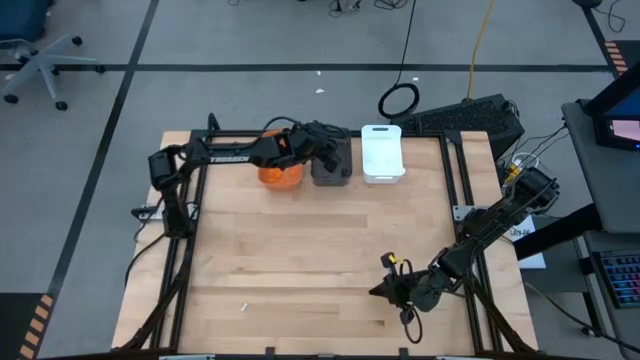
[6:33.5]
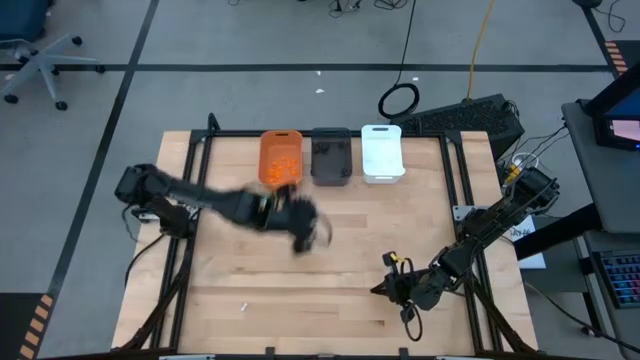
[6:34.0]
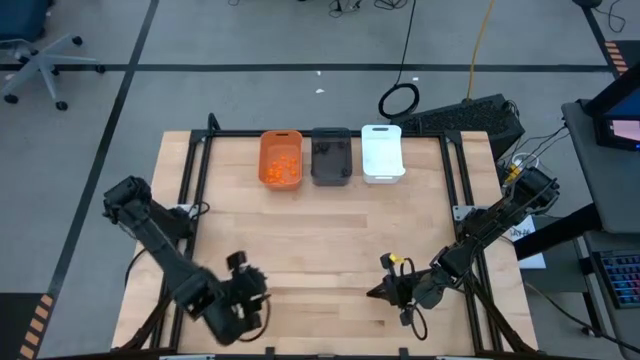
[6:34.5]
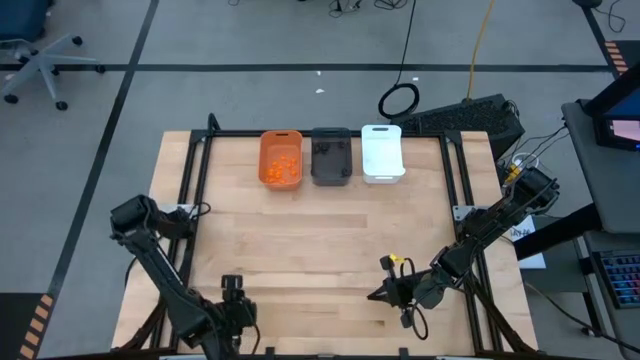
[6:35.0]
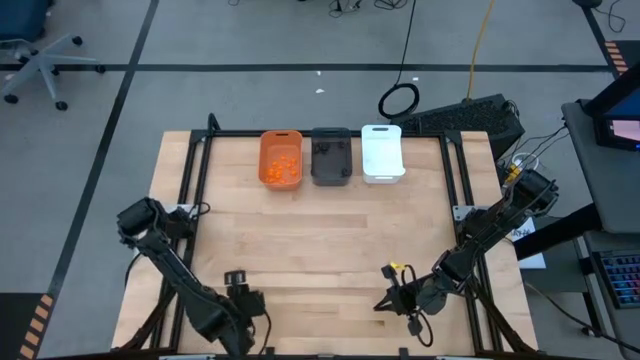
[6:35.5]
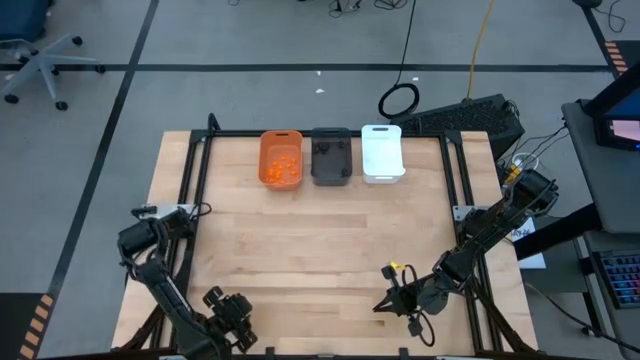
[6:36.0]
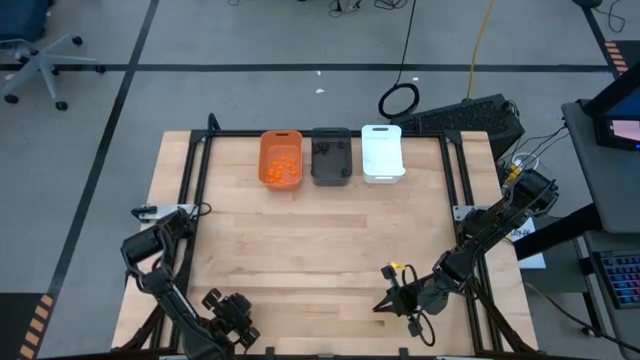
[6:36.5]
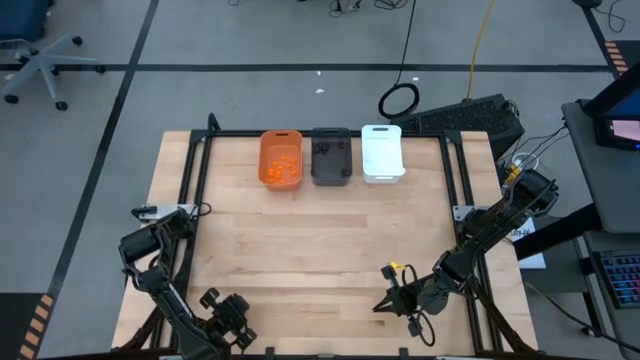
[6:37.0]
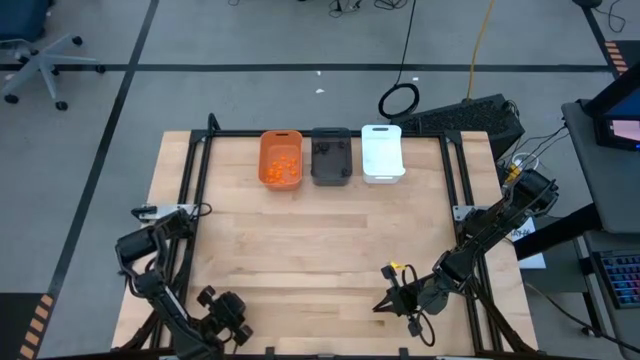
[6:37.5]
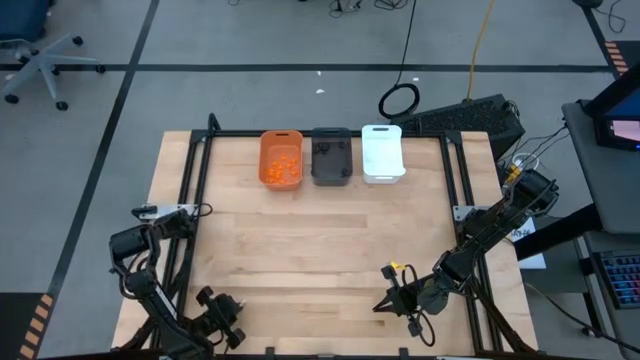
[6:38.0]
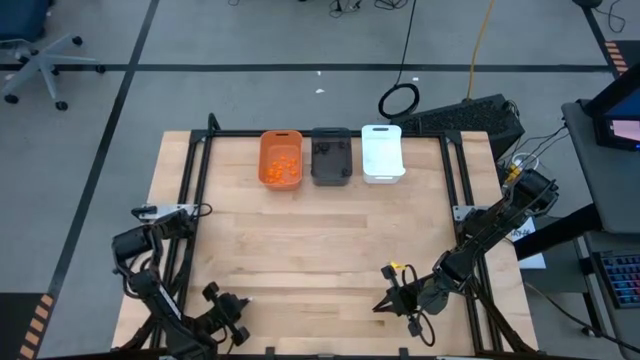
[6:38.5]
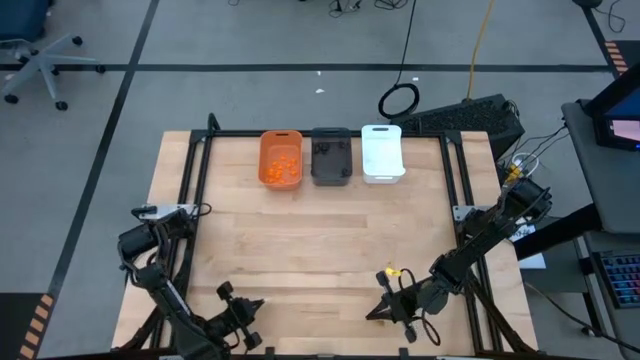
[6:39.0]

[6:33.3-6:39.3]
Task: Sort Halloween decoration
Put the white bone toy into the white bin

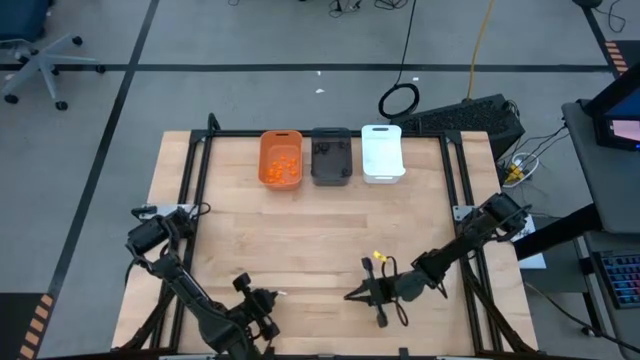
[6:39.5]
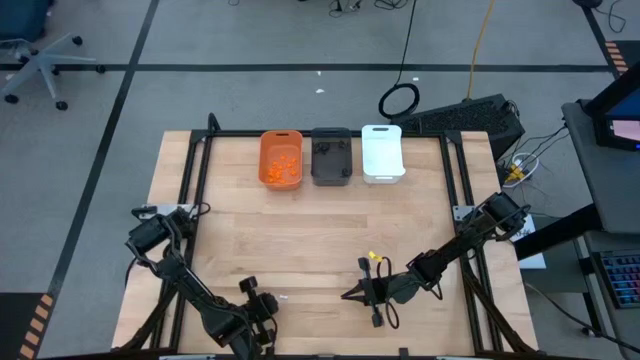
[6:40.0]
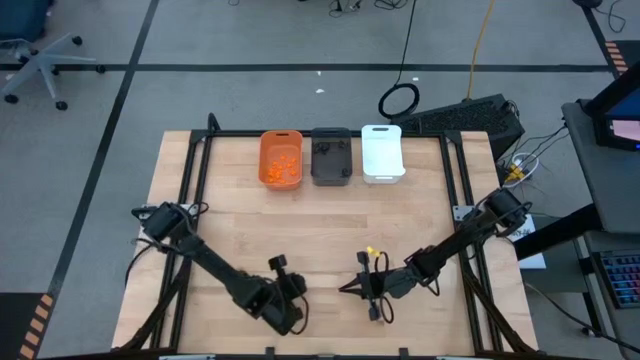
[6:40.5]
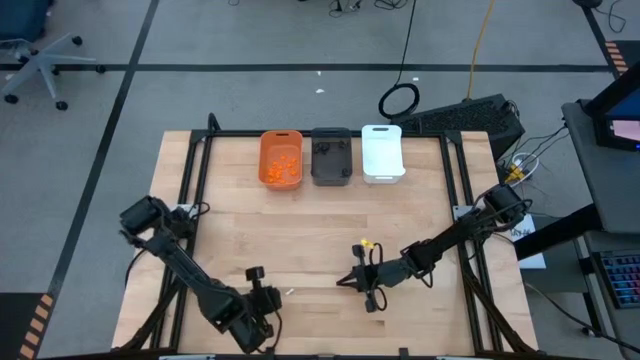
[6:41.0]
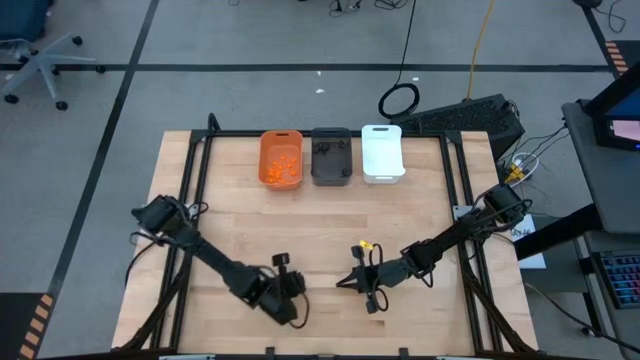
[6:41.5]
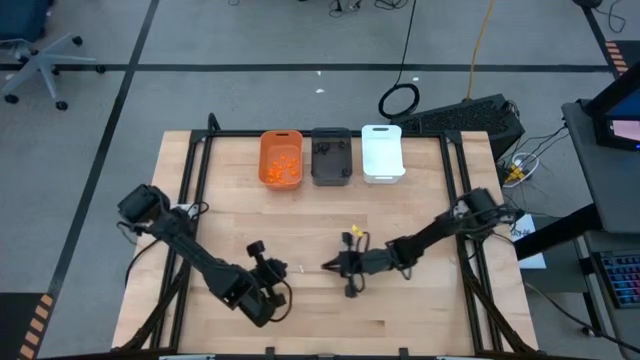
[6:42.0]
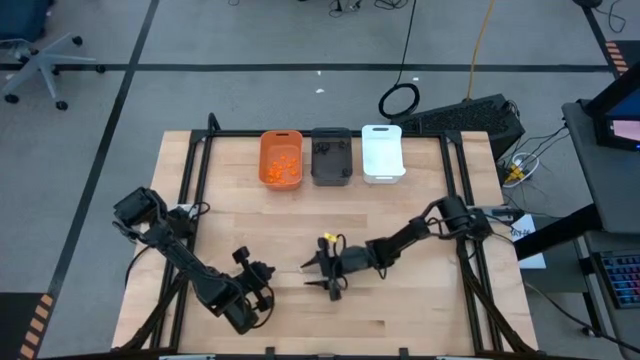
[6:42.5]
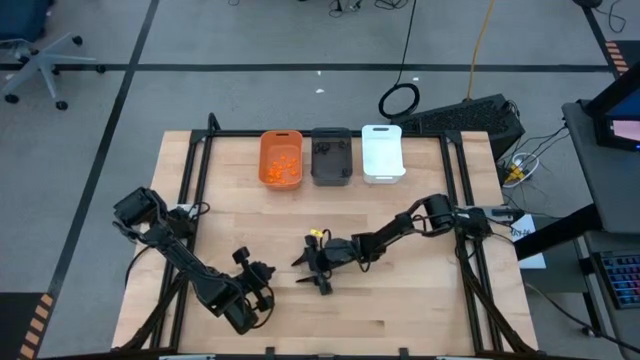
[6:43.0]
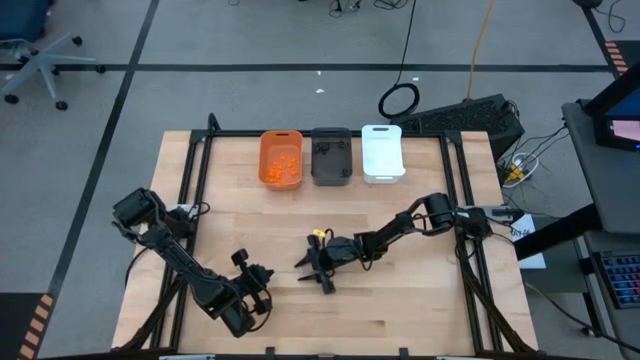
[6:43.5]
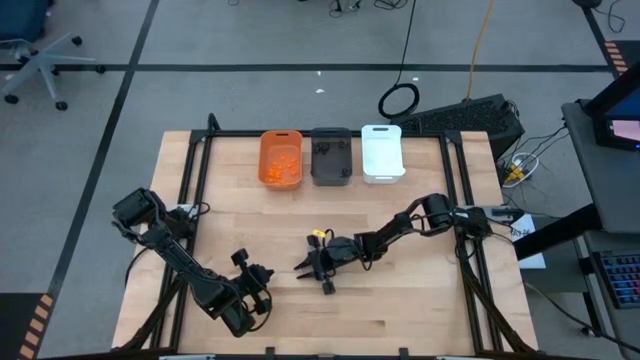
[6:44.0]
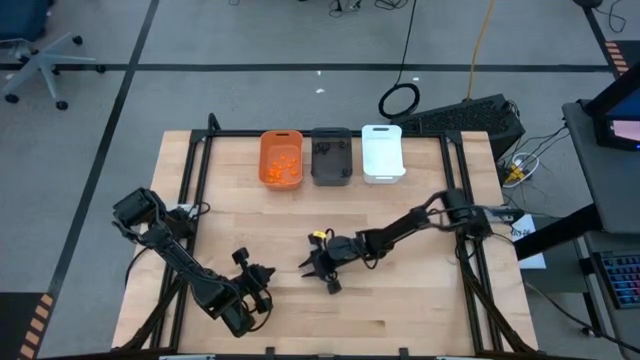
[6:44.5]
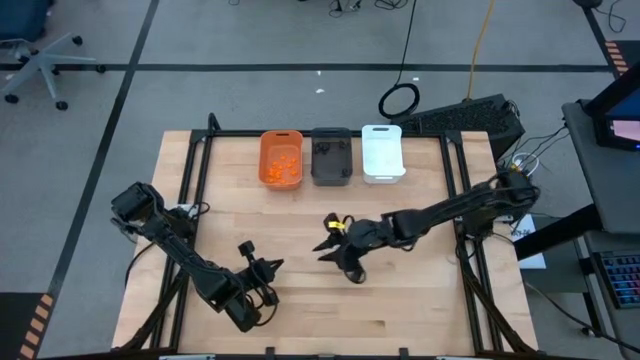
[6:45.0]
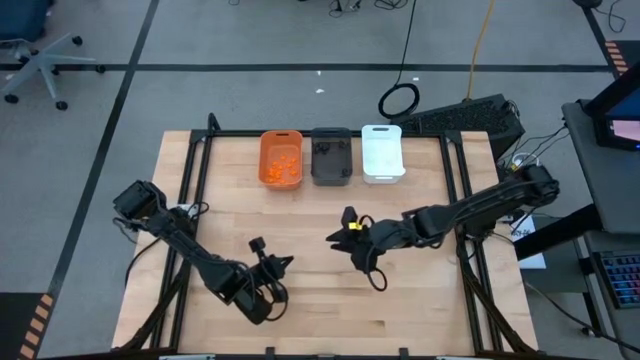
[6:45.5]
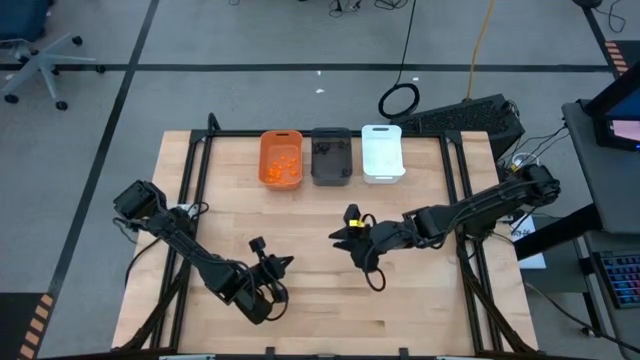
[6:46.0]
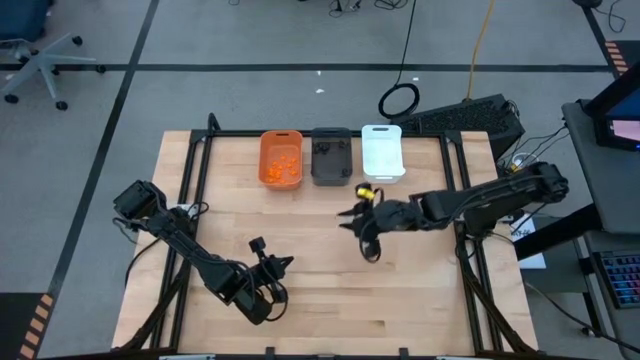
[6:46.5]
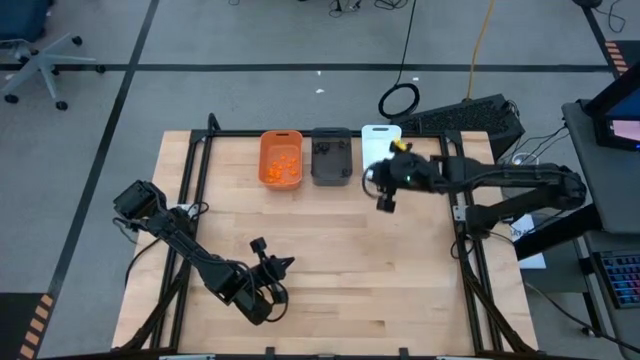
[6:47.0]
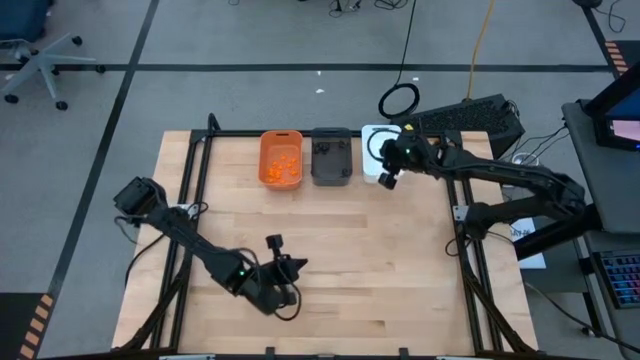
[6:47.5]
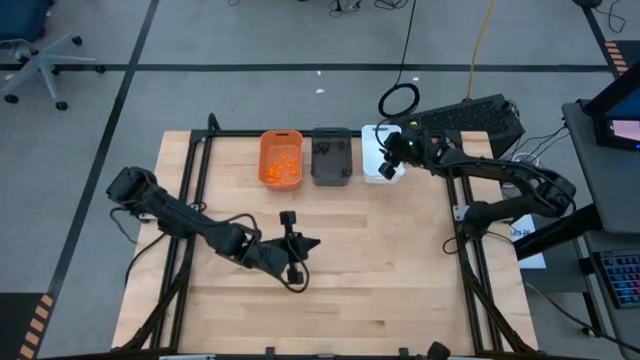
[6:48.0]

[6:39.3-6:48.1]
Put the white bone toy into the white bin
